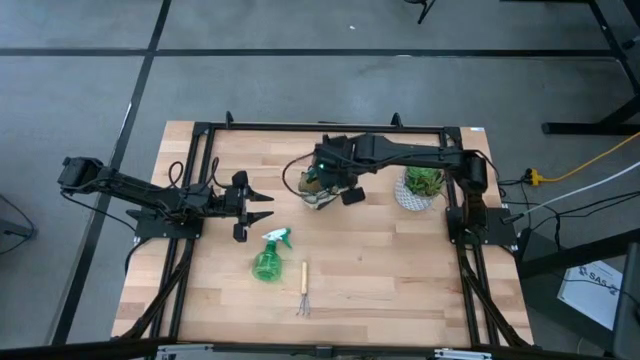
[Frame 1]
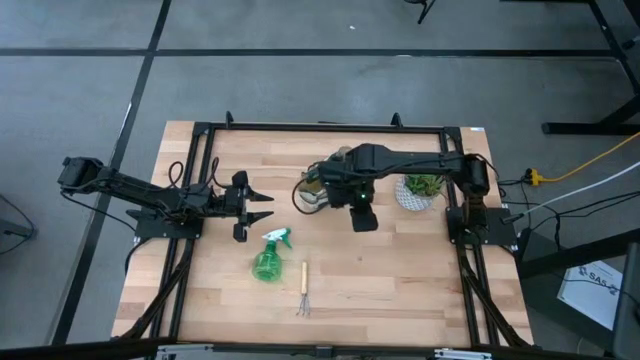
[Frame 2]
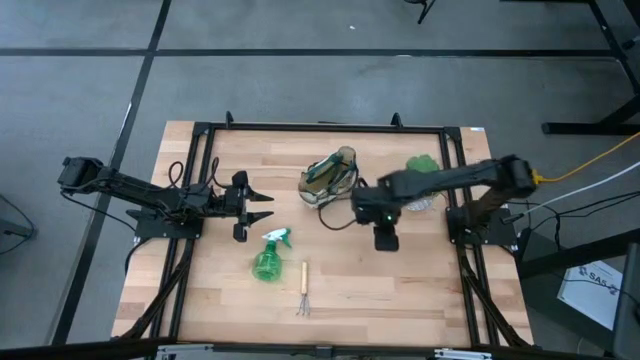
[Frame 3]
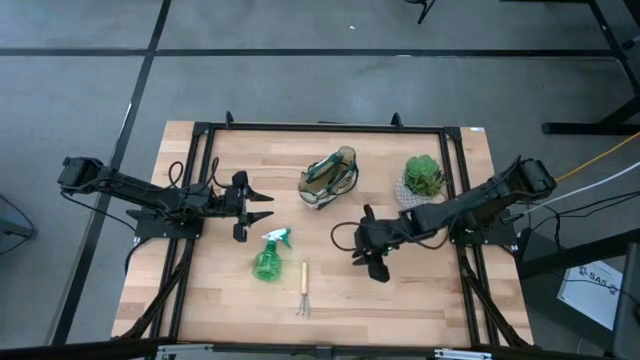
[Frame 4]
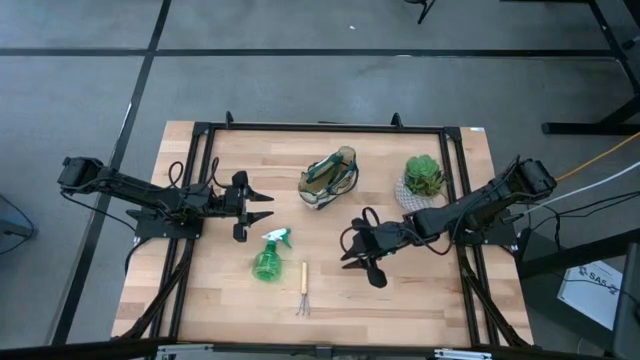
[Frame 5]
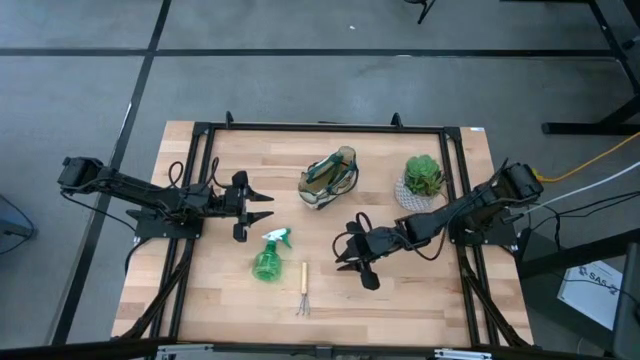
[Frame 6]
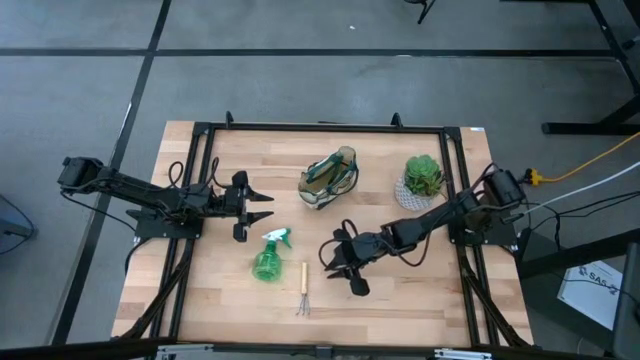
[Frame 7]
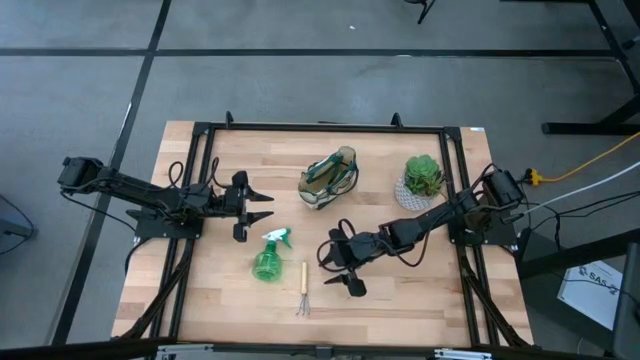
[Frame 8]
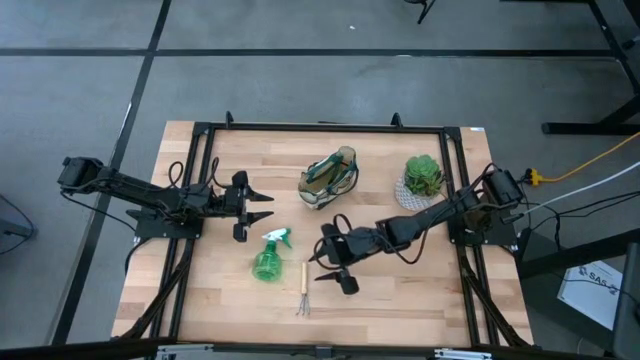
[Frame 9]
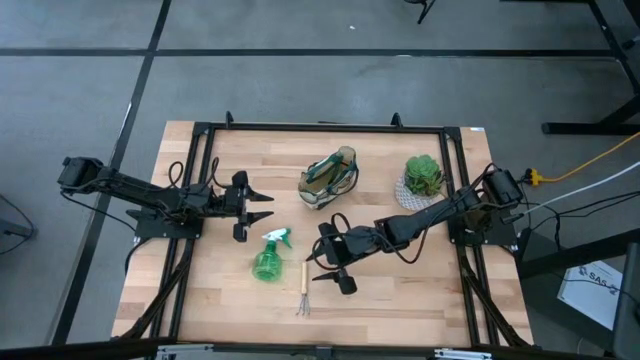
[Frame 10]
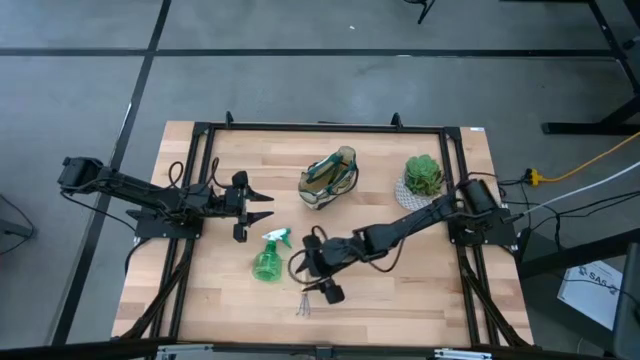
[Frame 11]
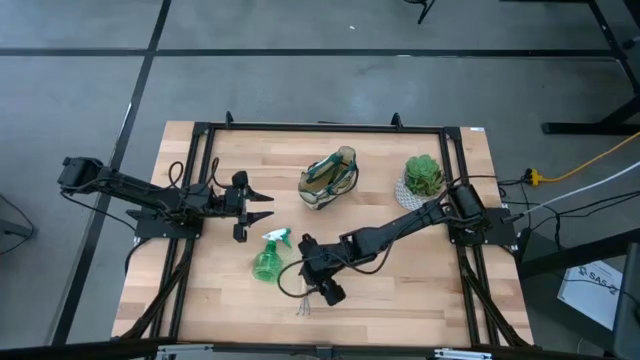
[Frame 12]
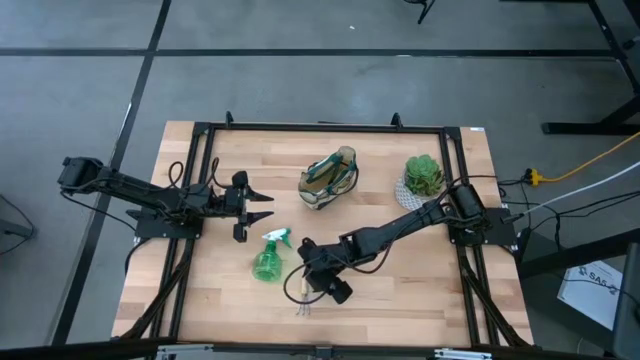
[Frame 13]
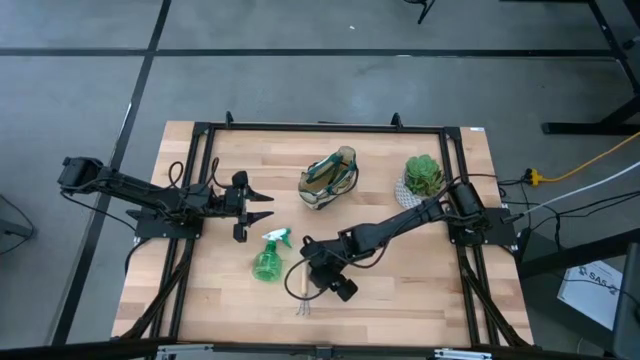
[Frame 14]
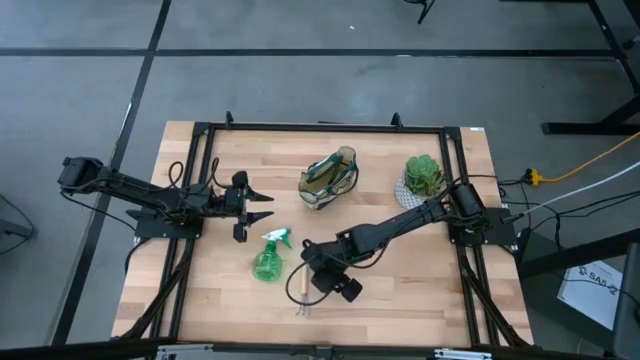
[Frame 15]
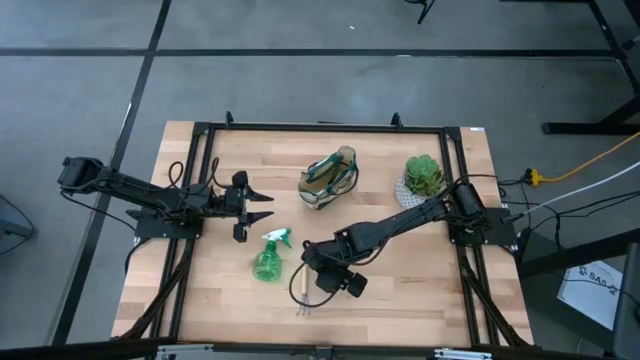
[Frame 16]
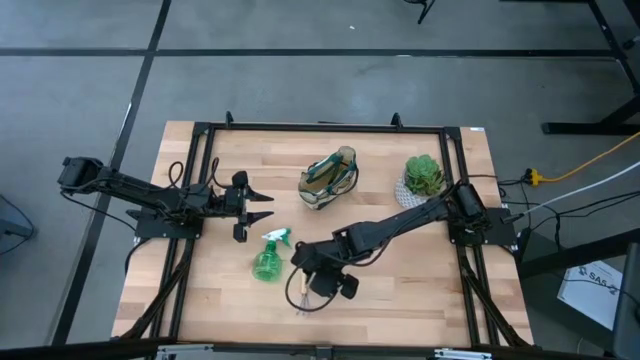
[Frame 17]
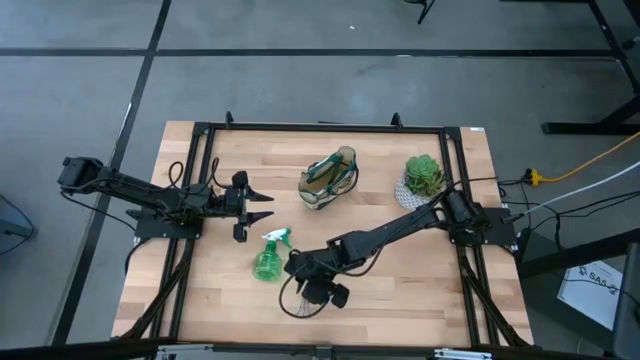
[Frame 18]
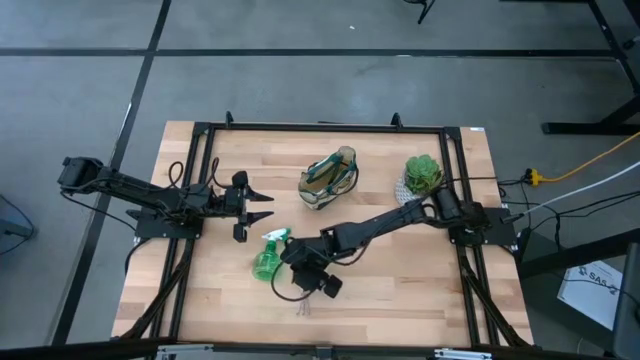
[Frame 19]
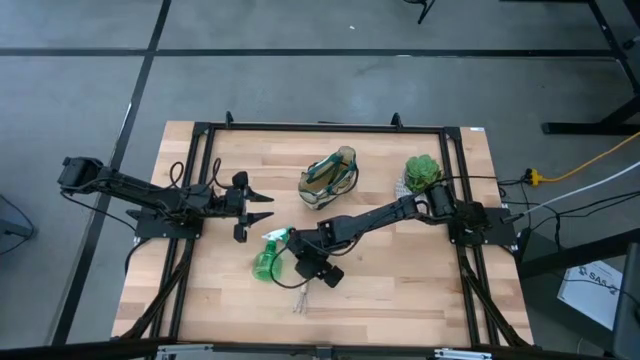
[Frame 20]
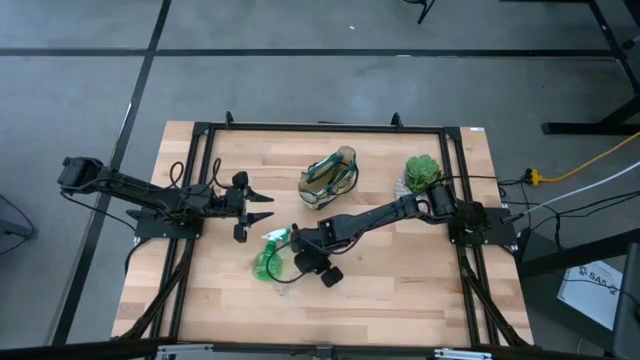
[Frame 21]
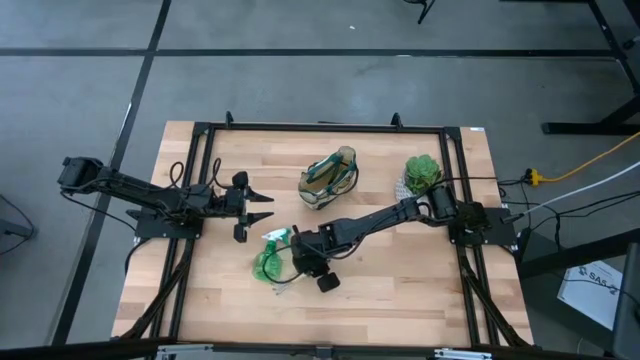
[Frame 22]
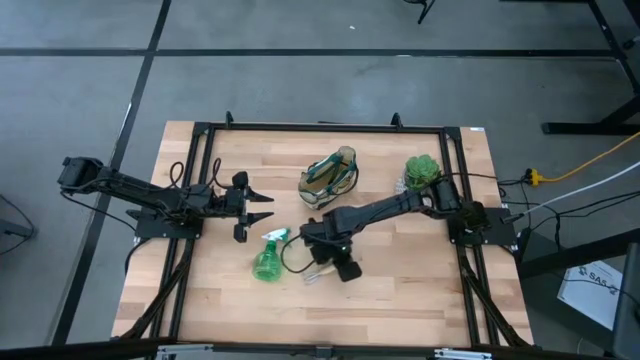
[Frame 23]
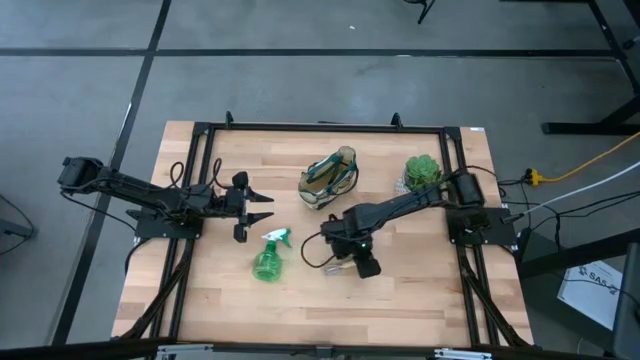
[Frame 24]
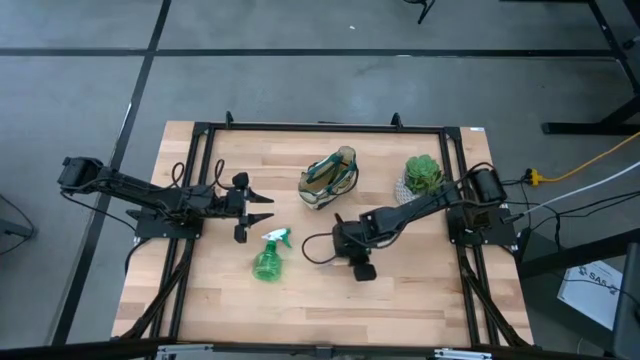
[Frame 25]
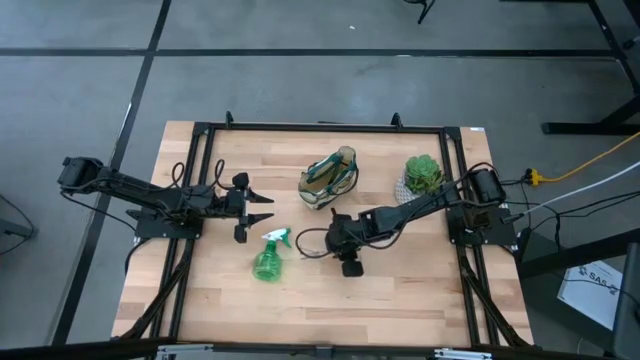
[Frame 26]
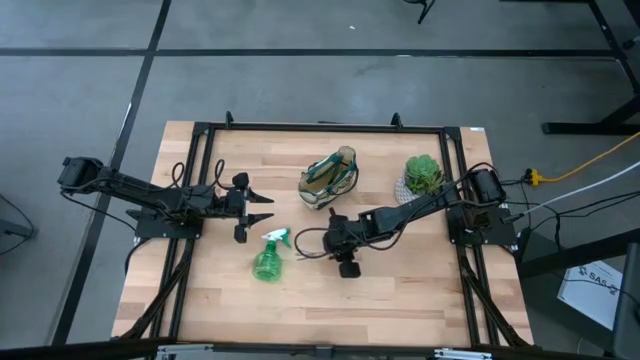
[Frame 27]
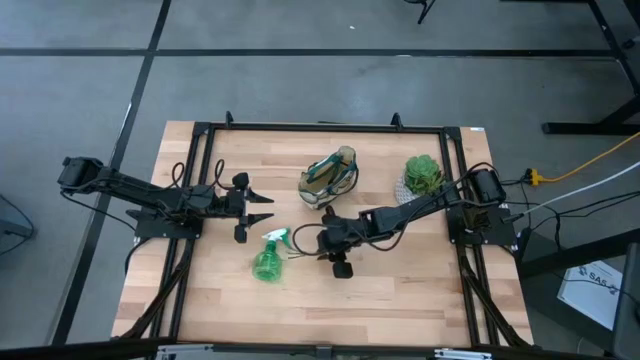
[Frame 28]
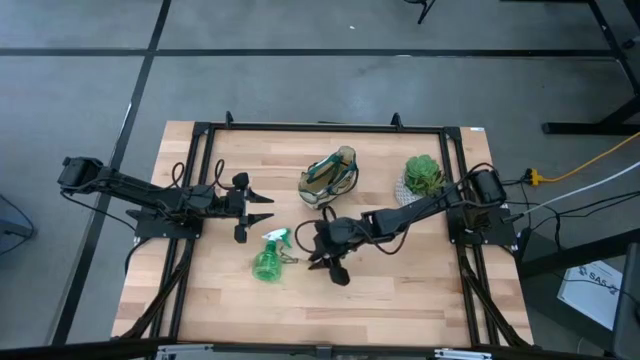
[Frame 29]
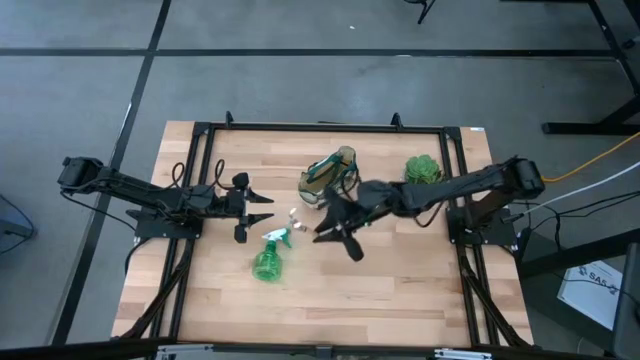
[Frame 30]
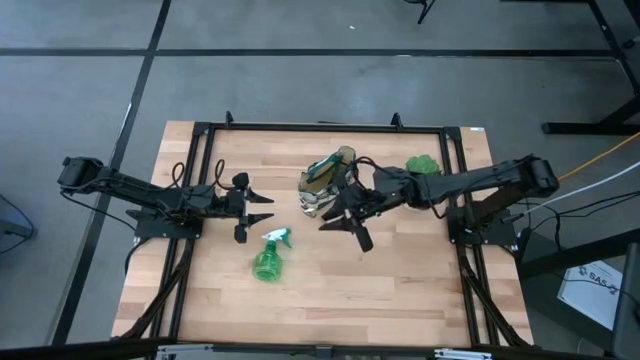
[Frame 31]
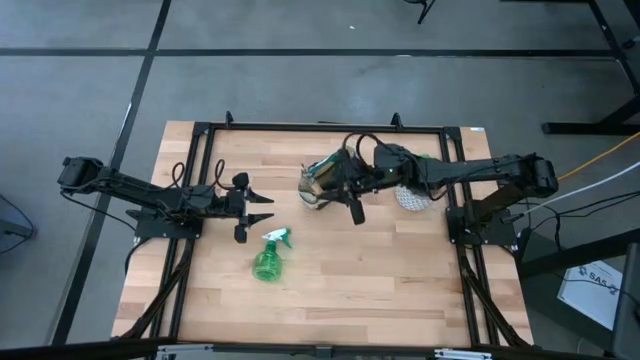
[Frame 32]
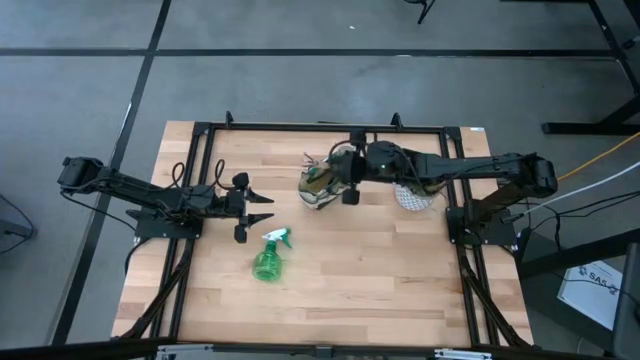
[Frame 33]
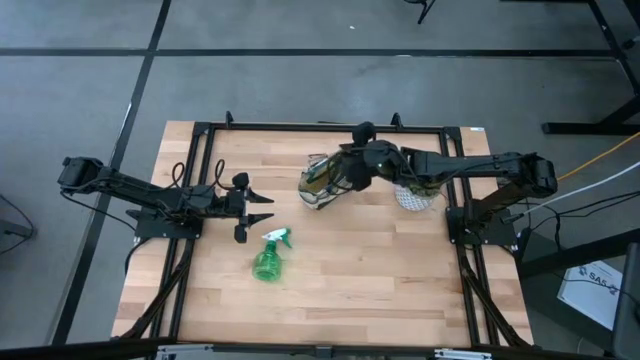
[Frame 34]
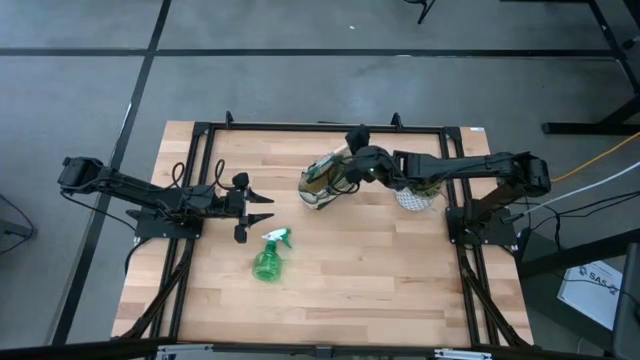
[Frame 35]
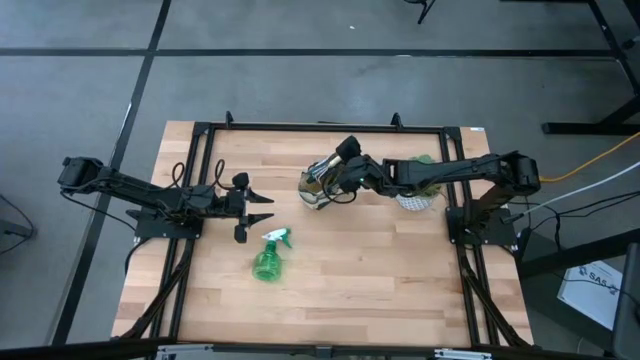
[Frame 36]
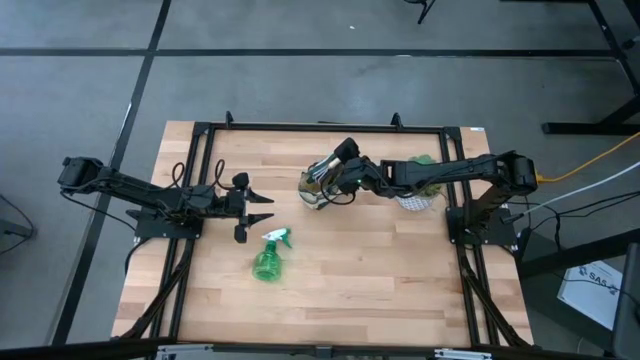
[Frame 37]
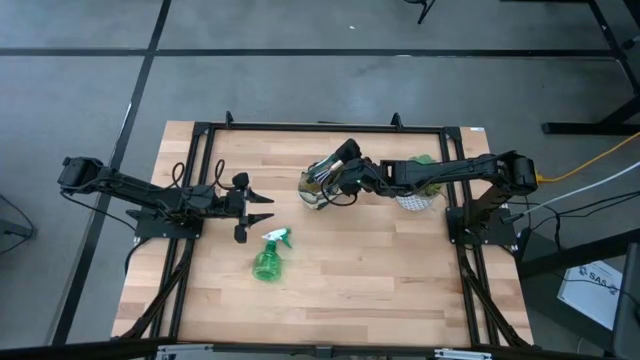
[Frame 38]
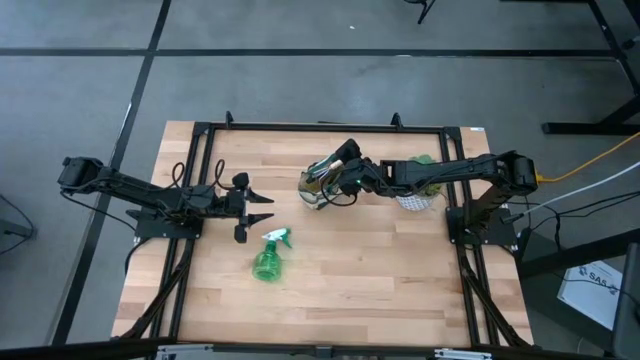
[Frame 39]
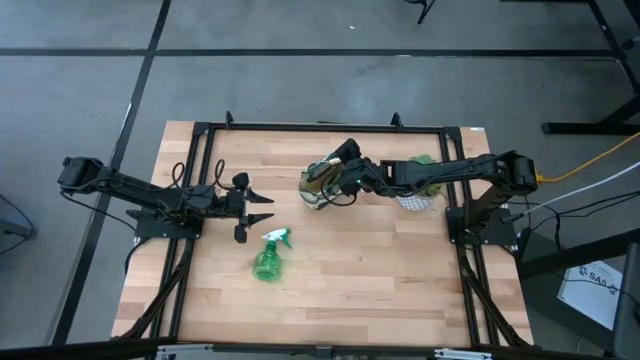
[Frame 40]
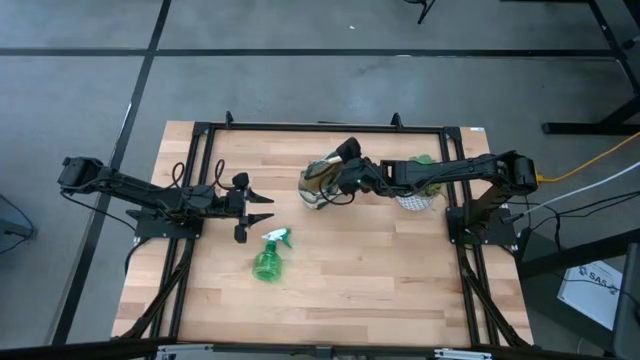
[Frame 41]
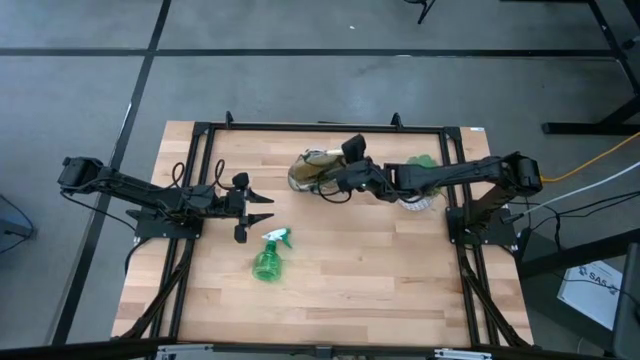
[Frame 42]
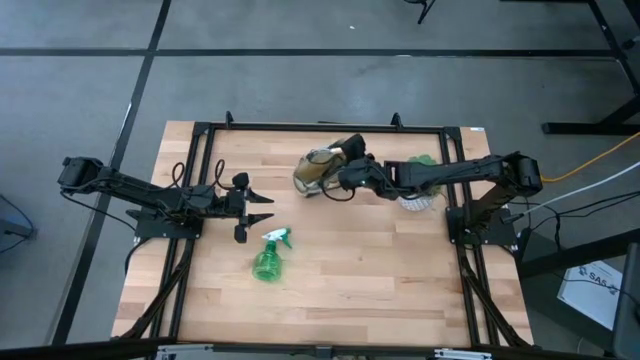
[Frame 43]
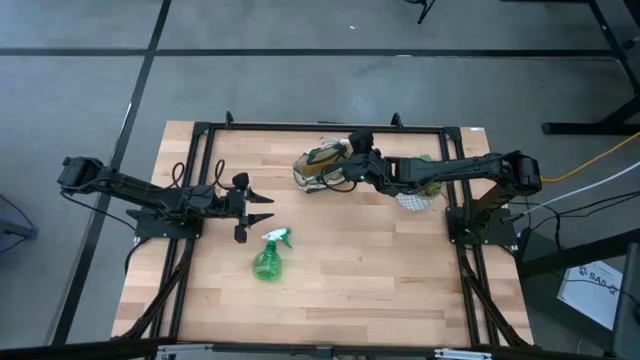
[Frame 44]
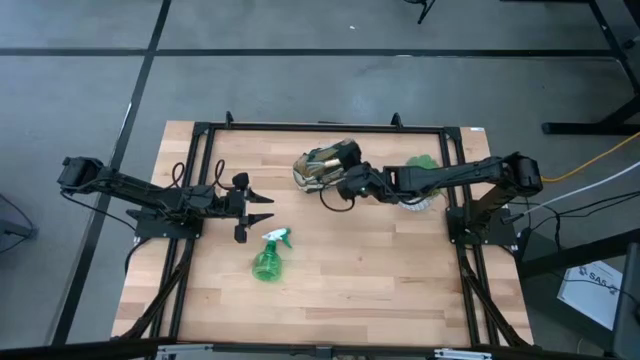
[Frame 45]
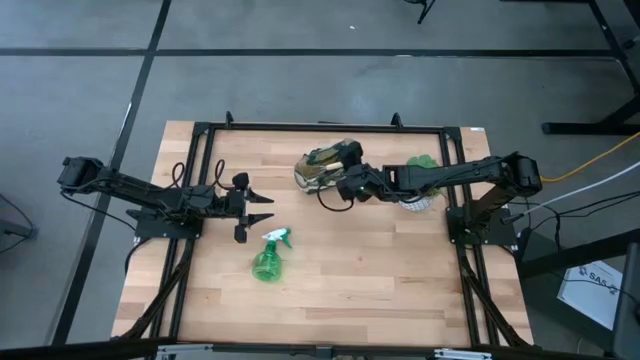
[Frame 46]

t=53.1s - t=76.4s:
Task: Pick & Place Garden tools in Gardening bag
Put the hand rake into the gardening bag
